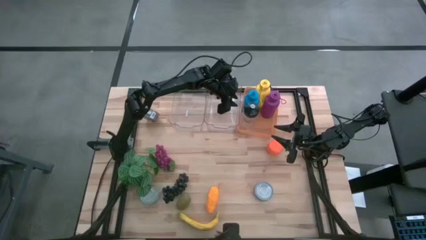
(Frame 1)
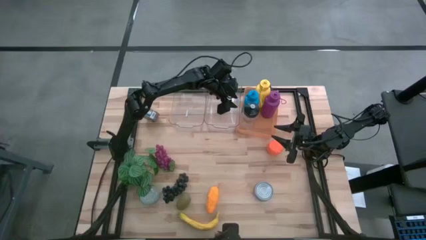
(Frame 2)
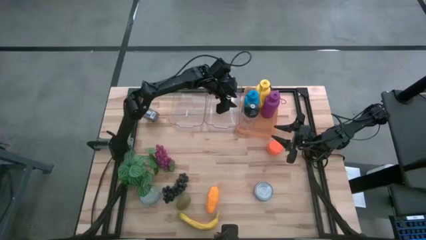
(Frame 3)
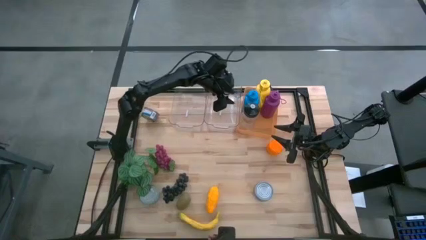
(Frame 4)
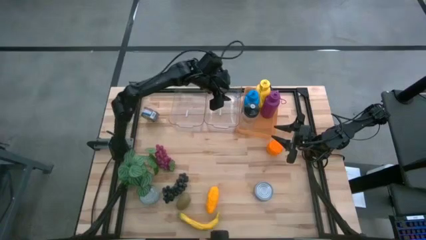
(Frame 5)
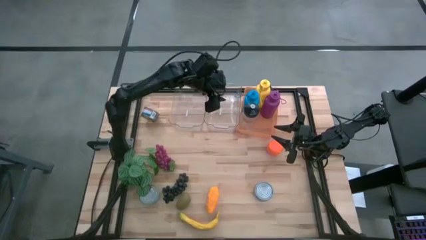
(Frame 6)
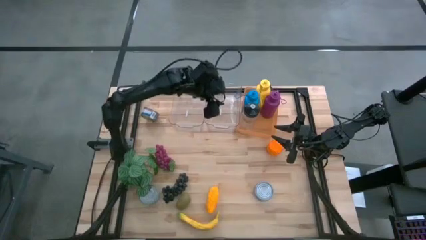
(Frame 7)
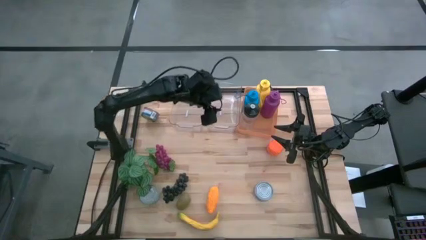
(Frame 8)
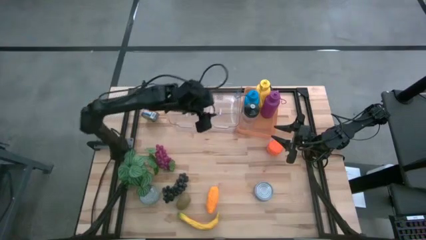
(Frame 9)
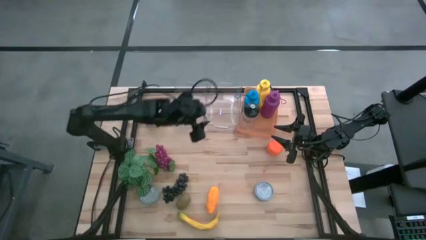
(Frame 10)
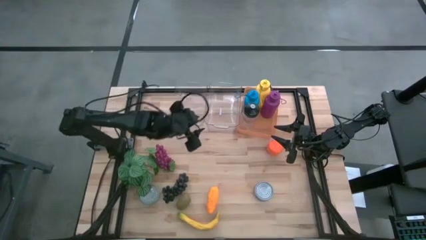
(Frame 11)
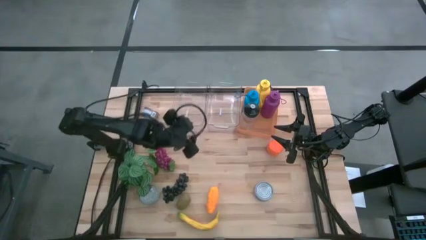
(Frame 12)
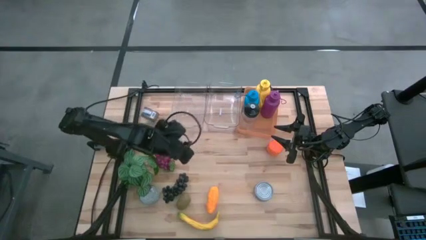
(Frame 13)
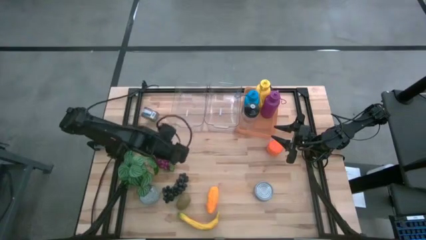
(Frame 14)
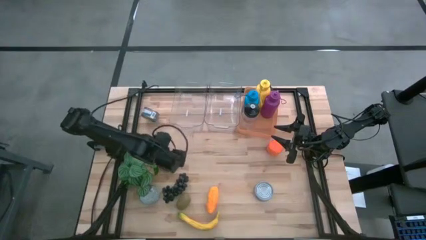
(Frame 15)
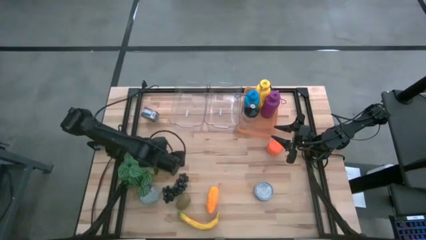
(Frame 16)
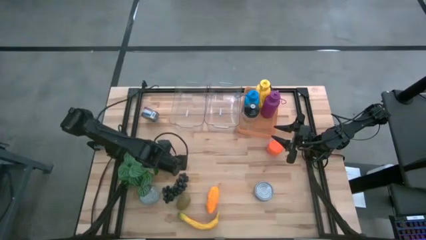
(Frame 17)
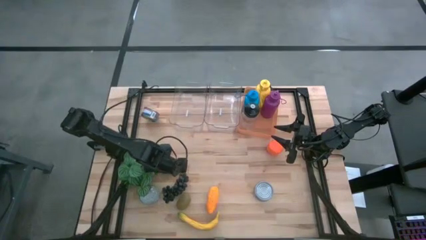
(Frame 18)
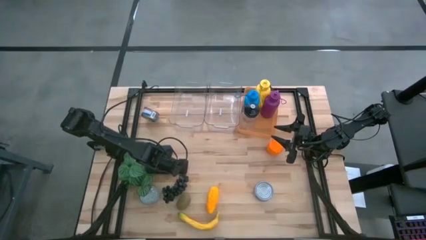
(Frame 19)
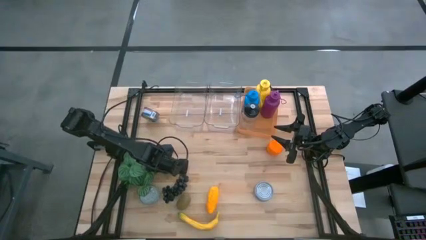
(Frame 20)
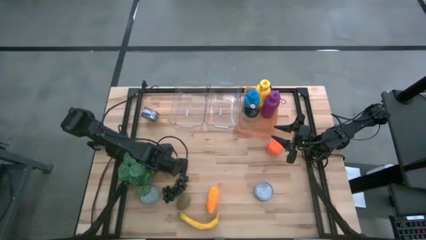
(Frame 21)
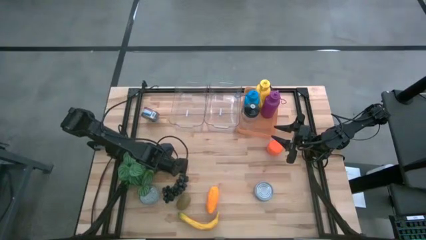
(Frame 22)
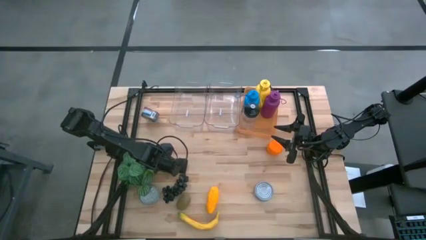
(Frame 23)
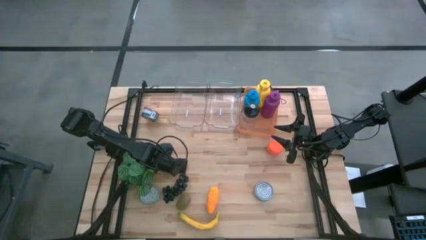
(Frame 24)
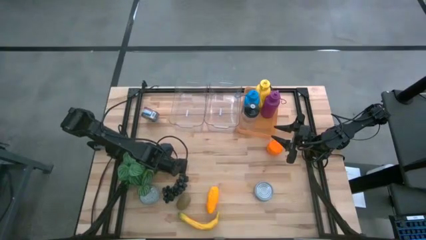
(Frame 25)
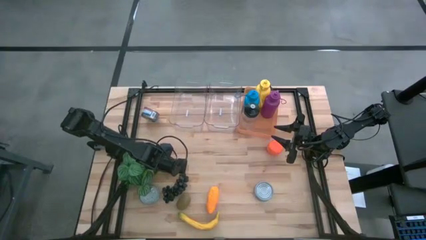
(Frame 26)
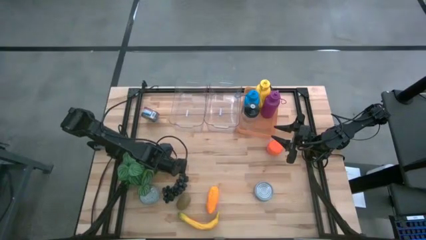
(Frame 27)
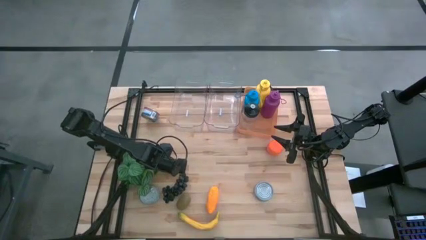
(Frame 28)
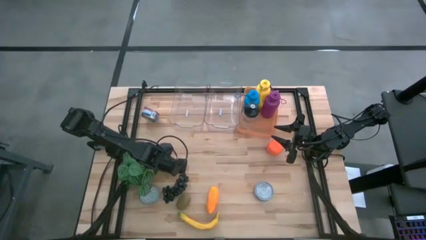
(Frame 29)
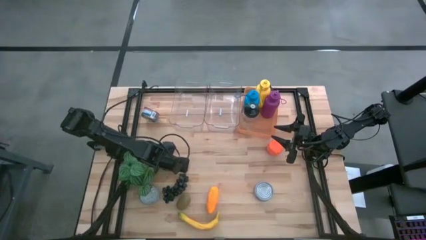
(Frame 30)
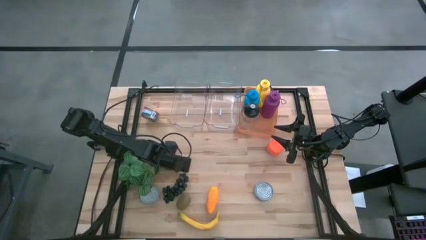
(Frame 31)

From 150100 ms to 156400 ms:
Task: Pick & Place Food Item
Put the red grapes into the right transparent bin

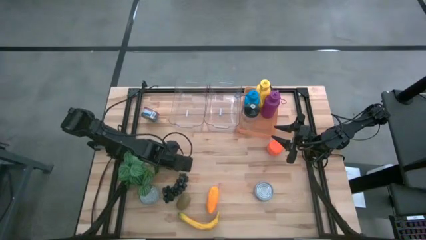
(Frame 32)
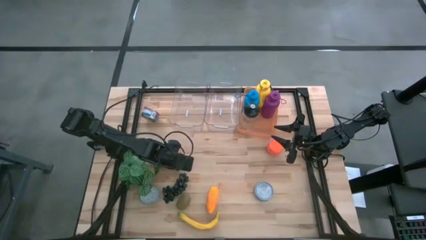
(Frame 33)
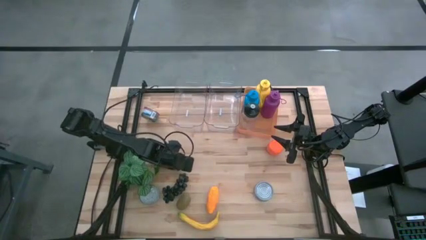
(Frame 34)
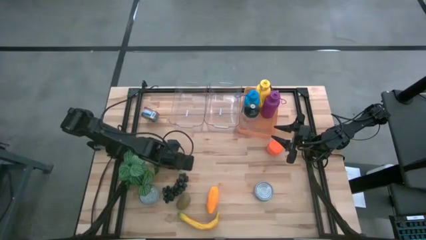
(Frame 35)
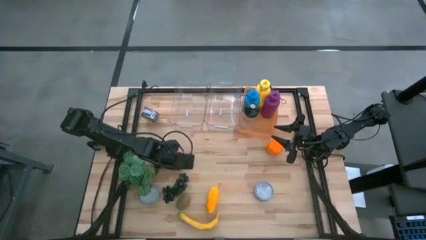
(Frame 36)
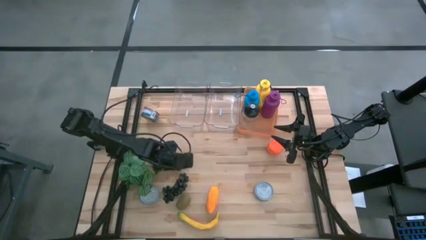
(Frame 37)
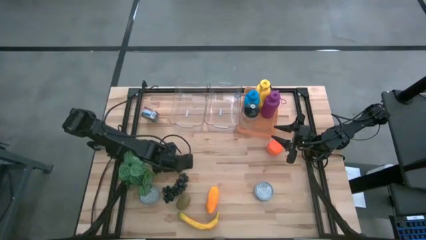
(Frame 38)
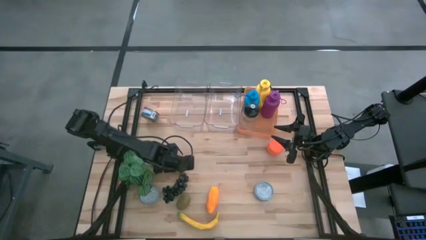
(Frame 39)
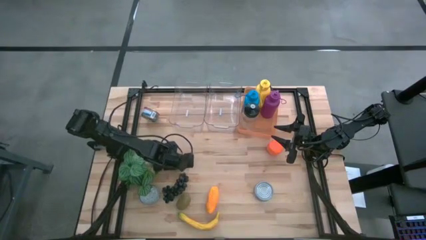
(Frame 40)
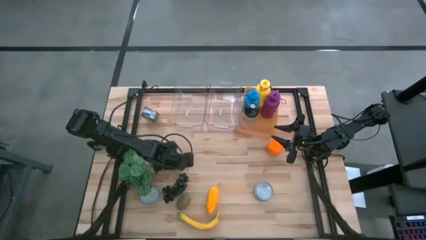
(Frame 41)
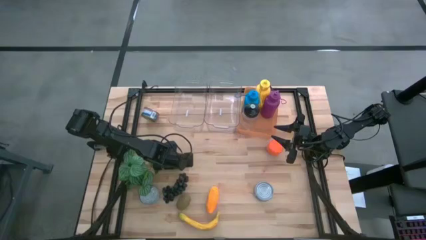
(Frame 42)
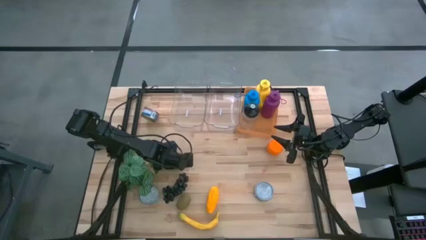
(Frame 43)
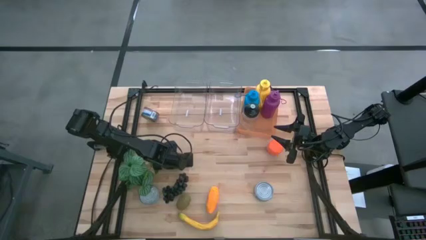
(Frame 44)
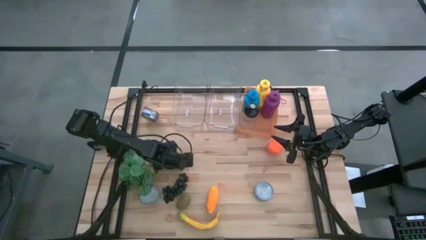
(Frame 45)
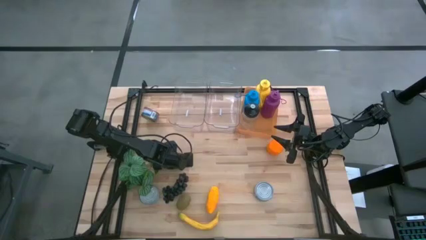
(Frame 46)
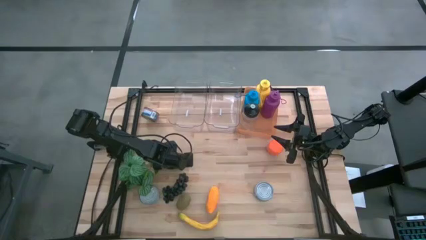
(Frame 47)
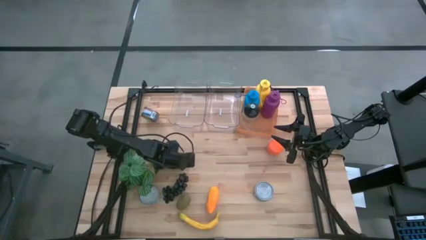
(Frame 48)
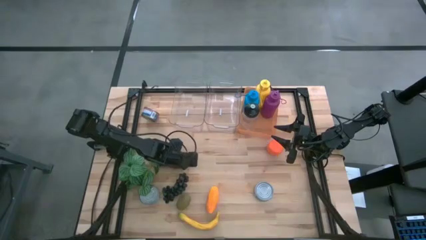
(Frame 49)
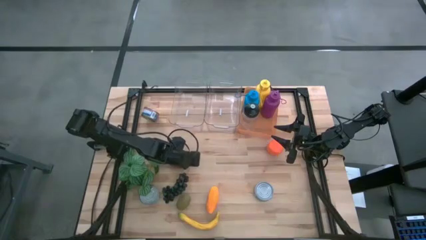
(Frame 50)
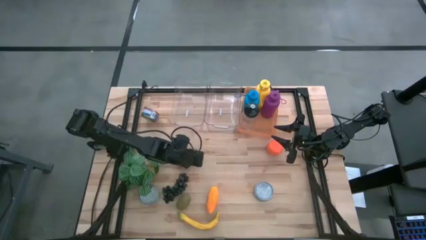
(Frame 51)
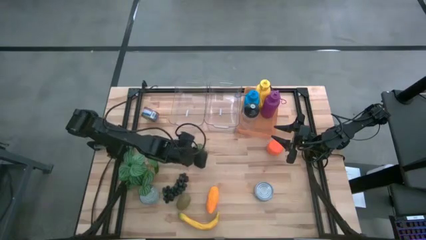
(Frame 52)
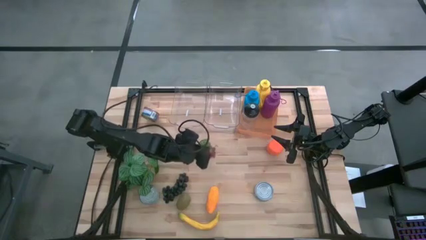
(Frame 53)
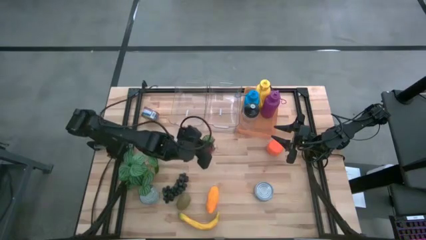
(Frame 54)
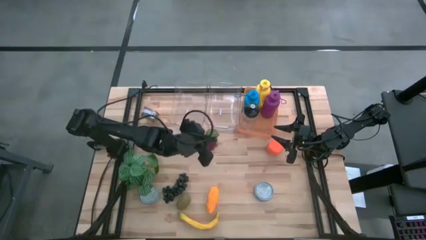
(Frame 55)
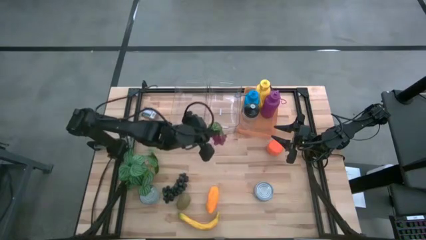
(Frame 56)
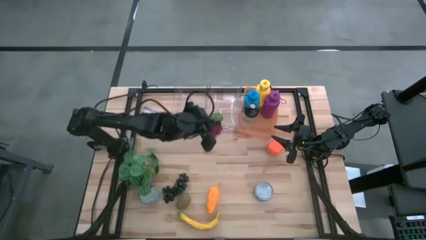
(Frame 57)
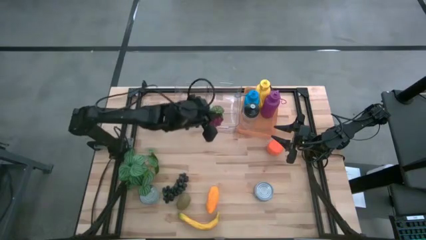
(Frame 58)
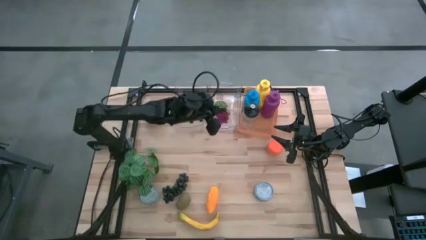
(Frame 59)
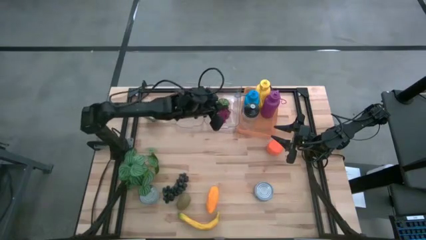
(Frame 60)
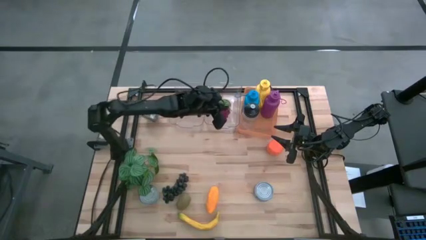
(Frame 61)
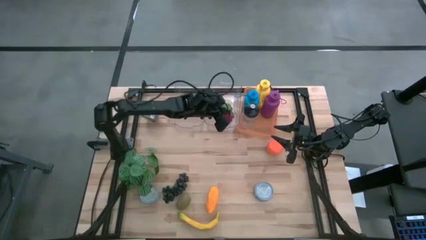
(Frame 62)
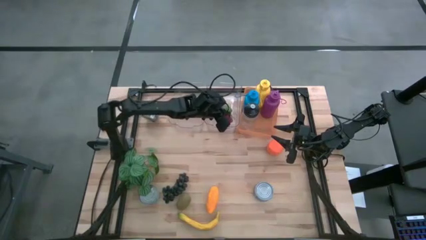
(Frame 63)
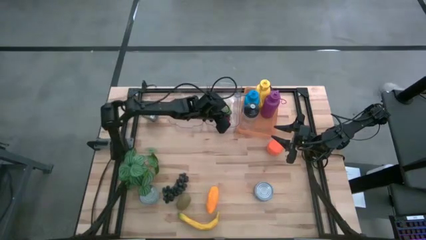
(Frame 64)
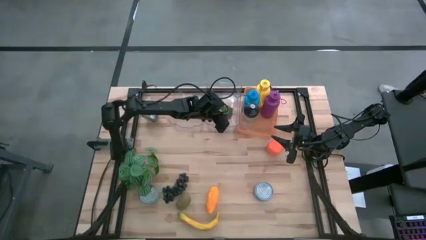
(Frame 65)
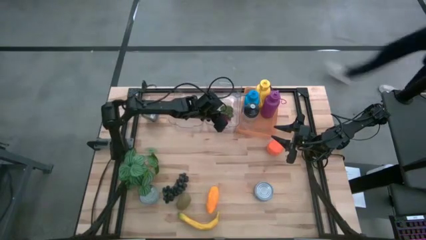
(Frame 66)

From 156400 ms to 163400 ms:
Put the red grapes into the right transparent bin
